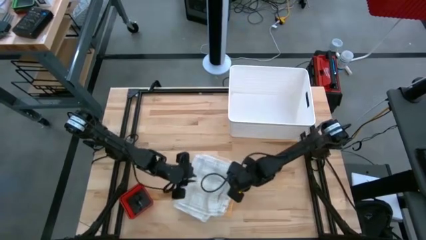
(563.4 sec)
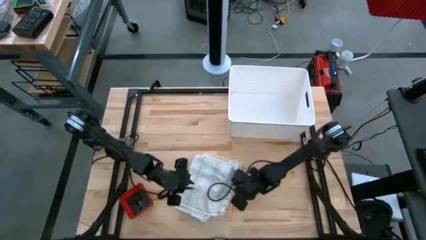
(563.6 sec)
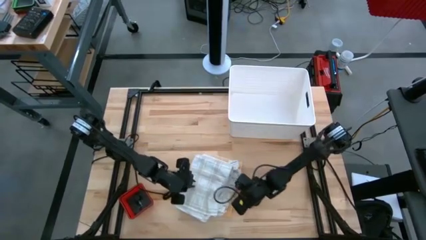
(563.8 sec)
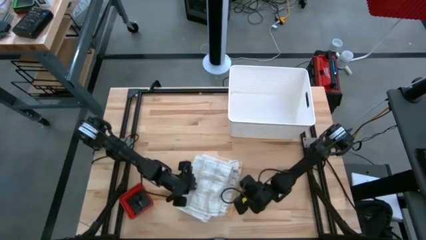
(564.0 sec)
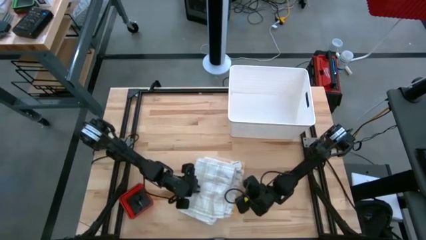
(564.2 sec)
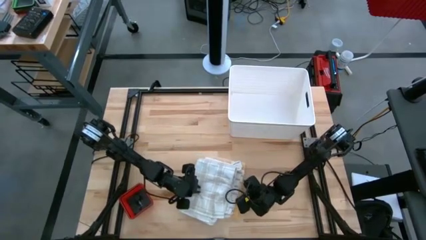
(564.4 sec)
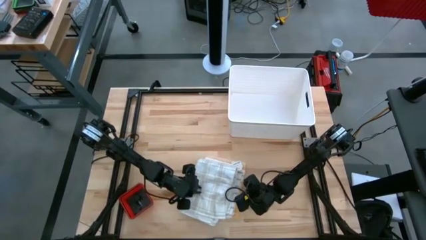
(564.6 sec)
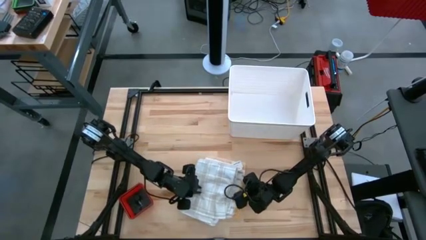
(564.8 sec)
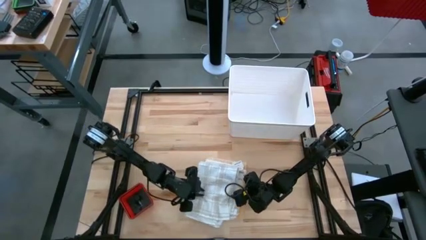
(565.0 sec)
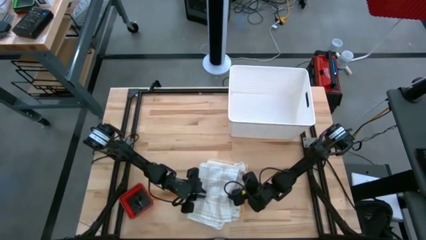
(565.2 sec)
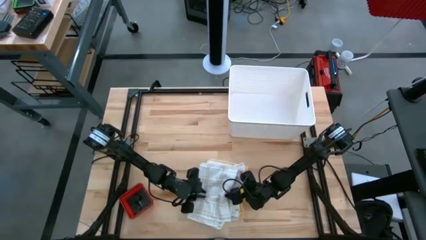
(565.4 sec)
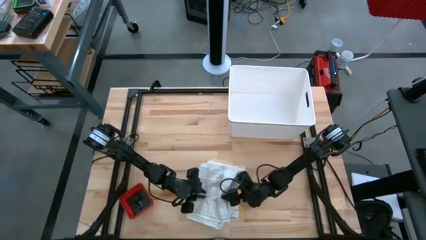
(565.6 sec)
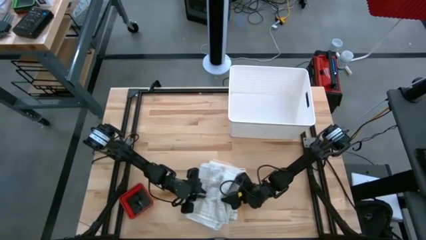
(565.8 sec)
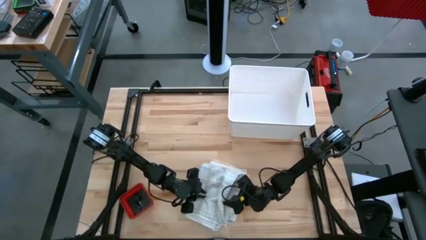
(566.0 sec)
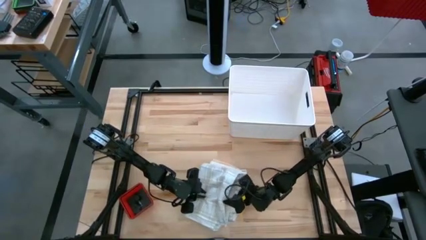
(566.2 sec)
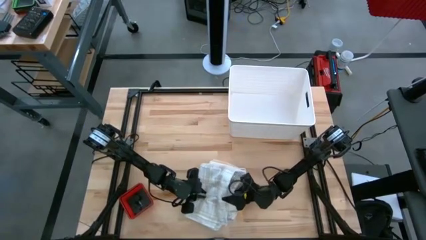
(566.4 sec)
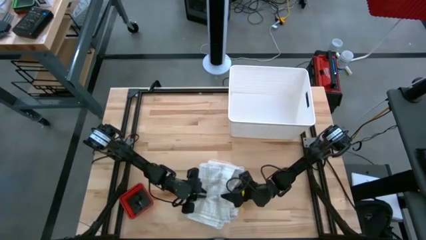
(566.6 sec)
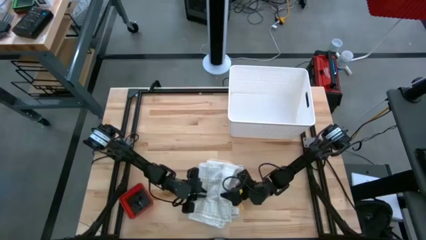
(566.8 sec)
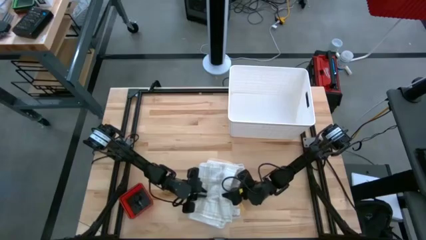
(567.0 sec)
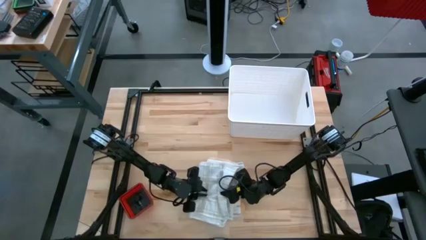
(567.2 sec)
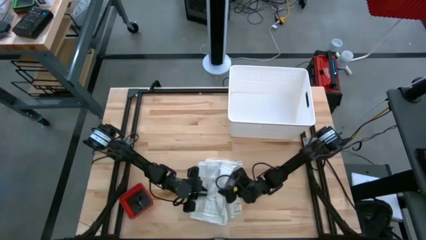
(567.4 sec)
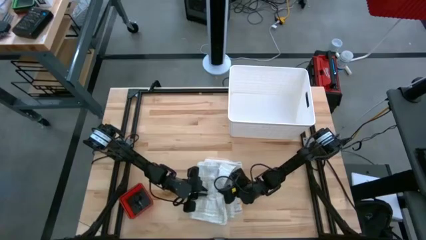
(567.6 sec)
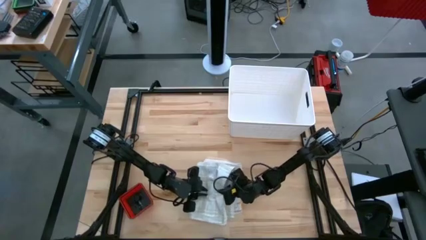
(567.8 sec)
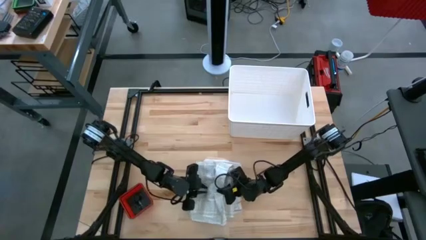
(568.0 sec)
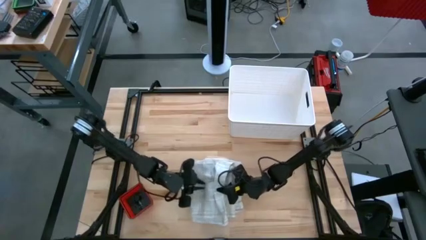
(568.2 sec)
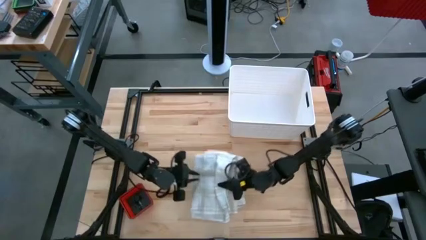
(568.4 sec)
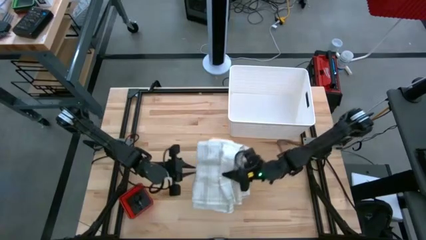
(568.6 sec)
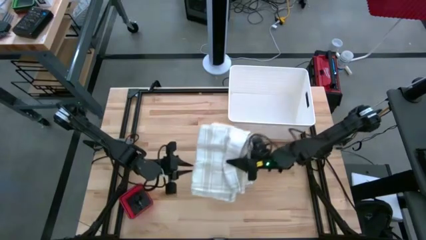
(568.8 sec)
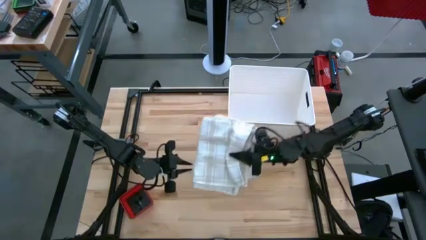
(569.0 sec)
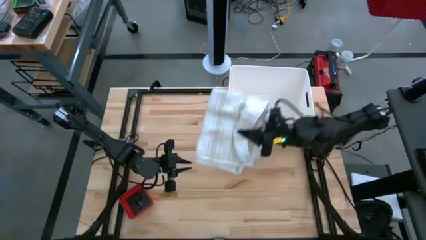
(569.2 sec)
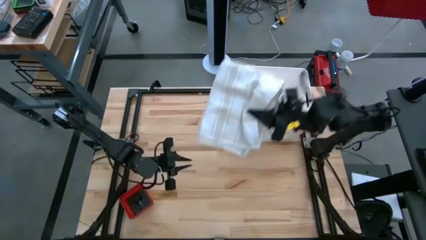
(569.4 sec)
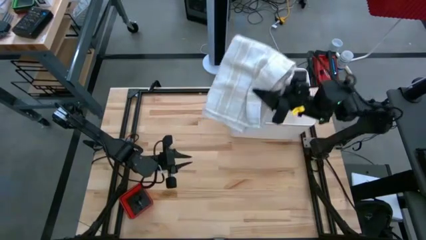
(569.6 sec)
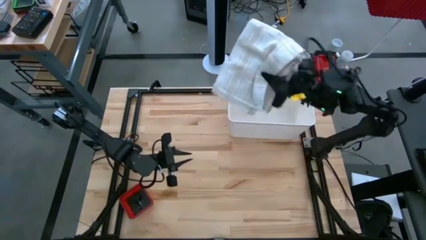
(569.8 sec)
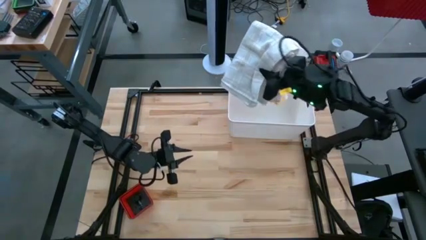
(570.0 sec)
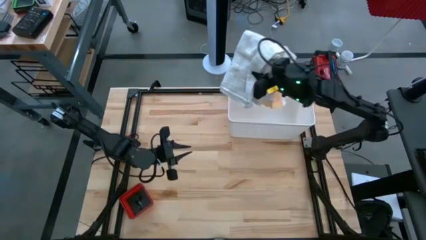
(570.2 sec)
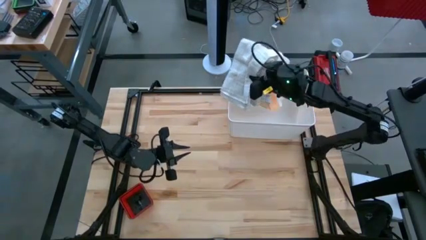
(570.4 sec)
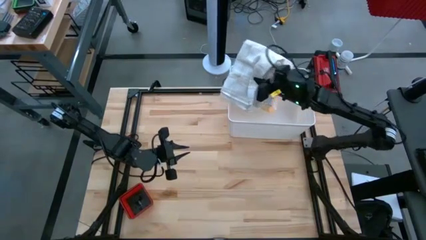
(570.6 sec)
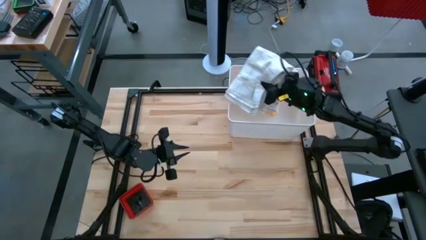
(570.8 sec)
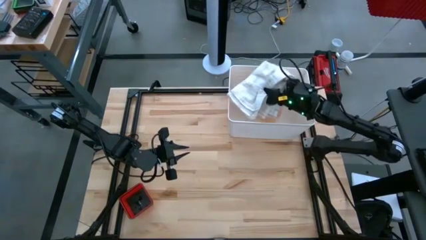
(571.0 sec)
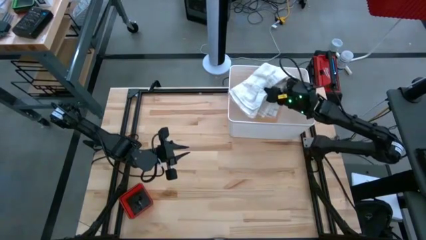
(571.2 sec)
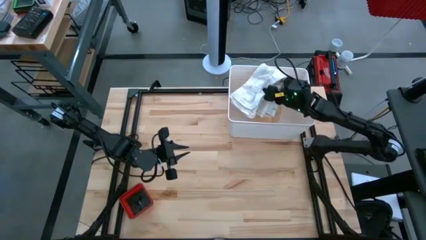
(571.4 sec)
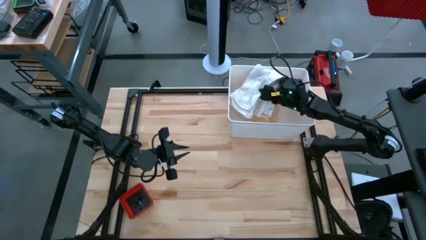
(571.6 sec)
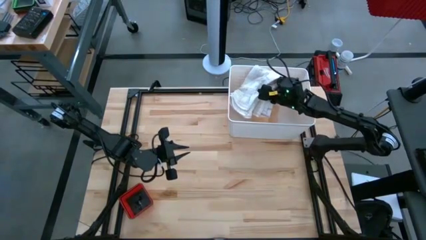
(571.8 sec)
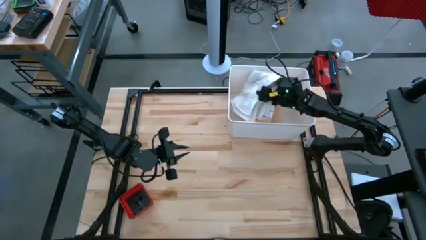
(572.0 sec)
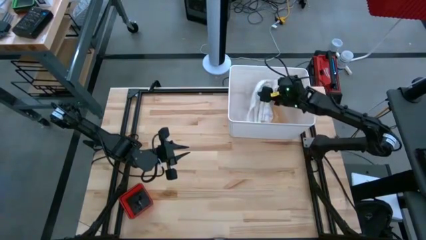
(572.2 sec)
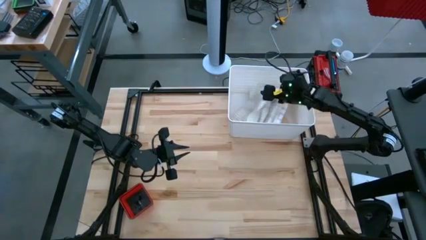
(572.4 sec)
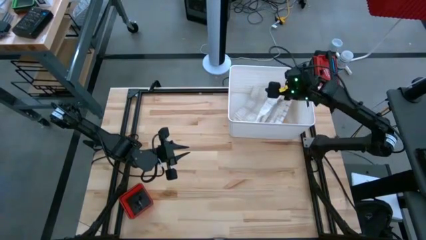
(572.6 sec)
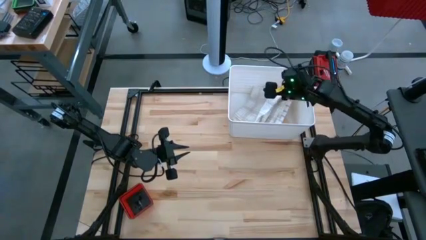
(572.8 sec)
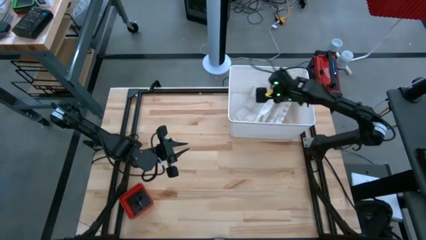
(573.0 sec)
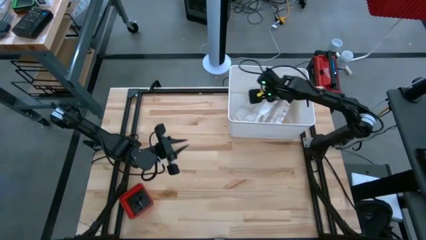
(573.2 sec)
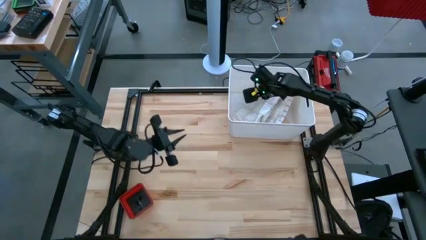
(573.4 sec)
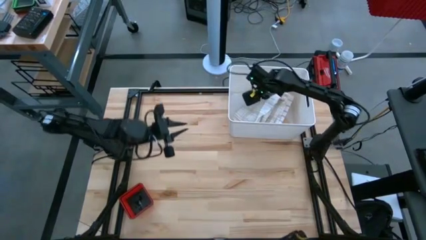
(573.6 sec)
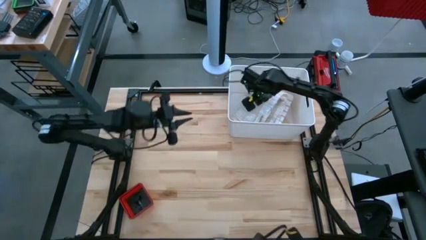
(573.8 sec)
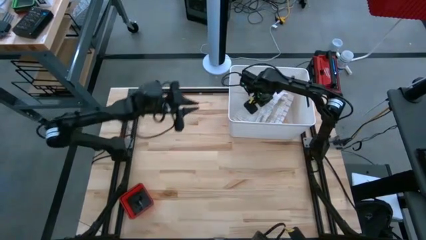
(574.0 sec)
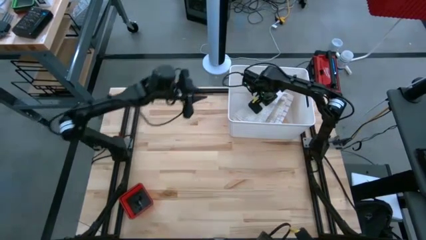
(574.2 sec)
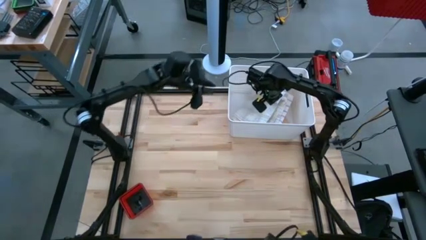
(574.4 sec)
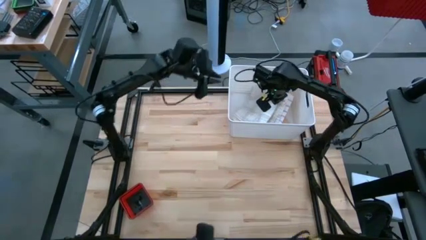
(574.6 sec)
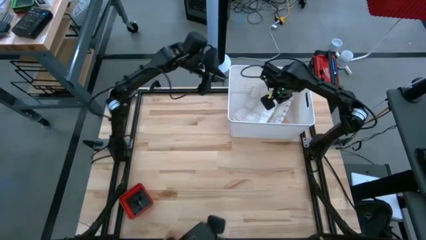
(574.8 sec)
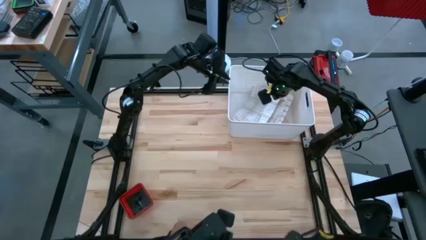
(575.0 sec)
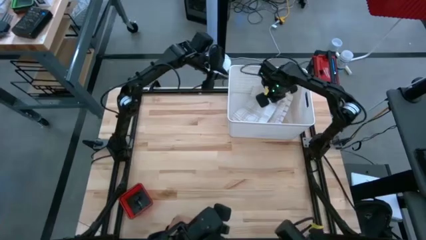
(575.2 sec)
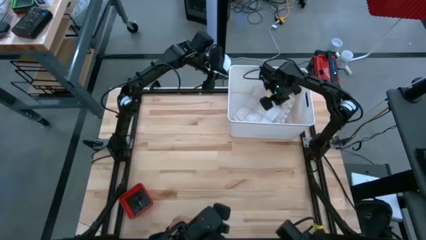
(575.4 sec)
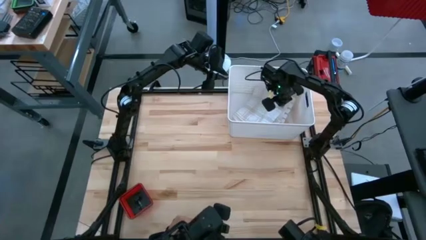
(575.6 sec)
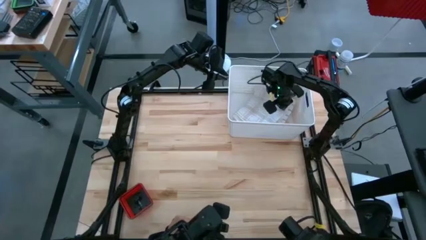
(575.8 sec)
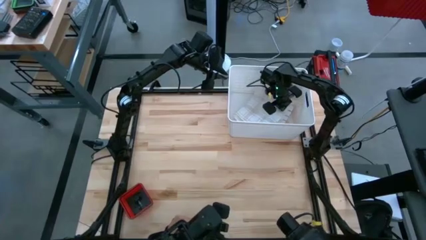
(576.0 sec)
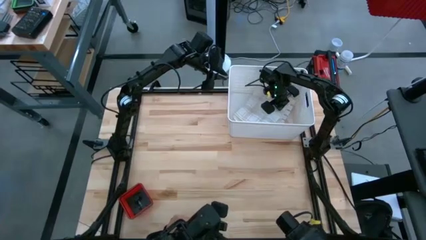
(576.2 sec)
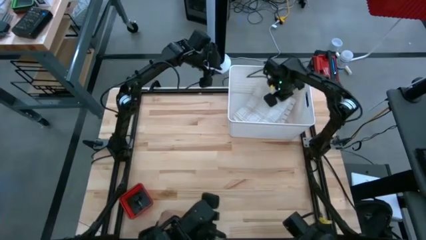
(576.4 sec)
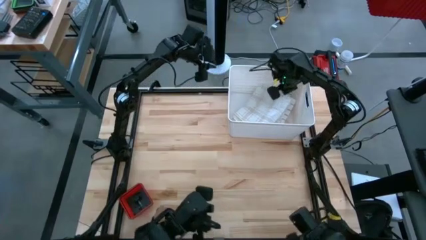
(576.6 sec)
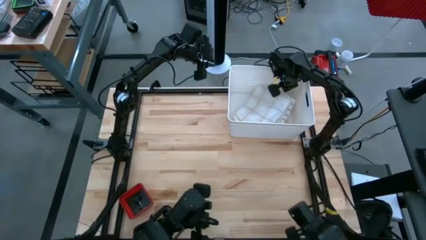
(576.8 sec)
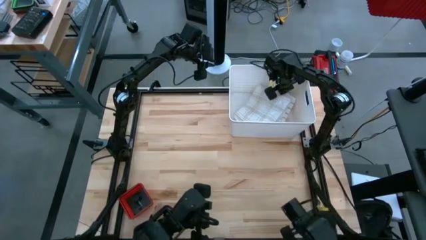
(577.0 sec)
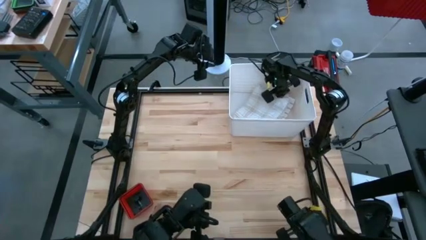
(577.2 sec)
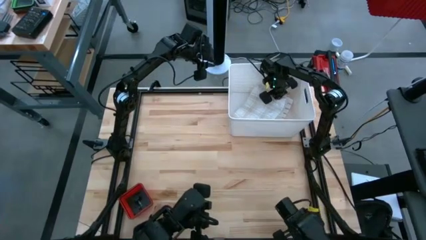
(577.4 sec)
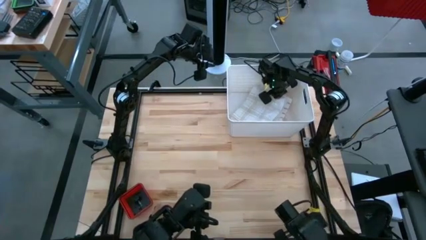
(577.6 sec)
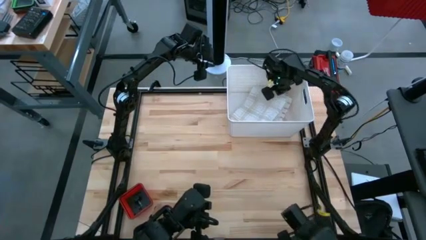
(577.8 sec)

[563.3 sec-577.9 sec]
Task: Fold towel
Put the folded towels into the white laundry bin
